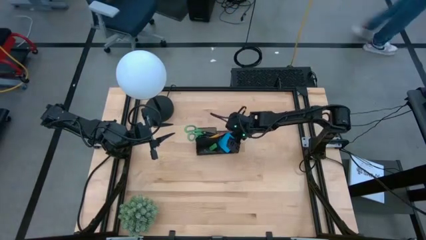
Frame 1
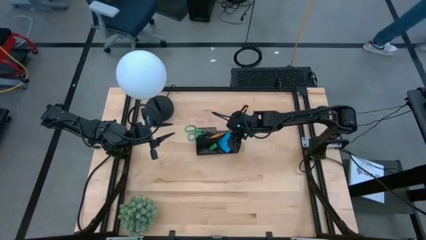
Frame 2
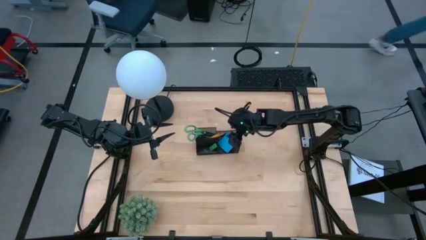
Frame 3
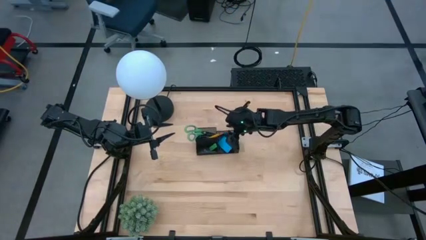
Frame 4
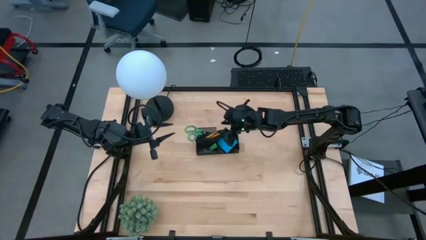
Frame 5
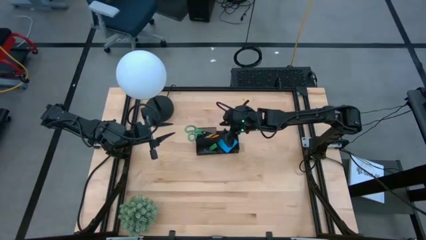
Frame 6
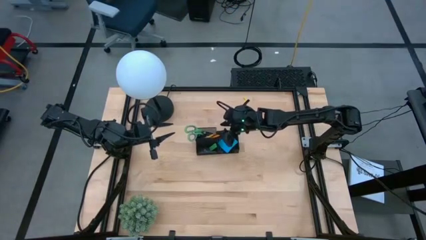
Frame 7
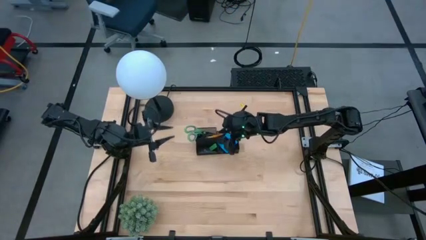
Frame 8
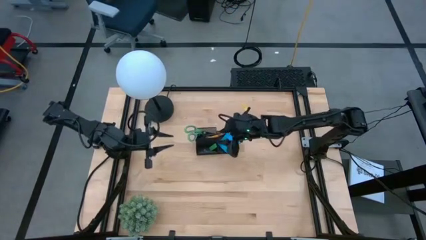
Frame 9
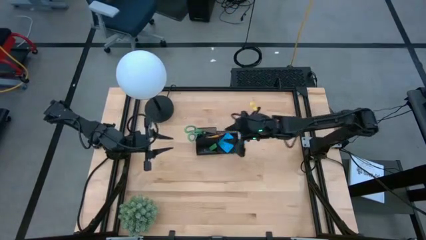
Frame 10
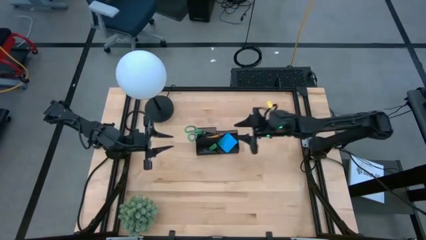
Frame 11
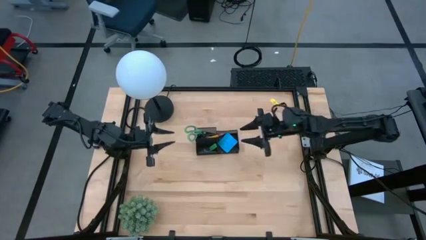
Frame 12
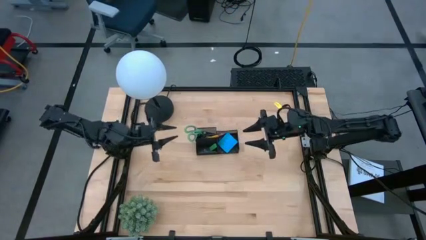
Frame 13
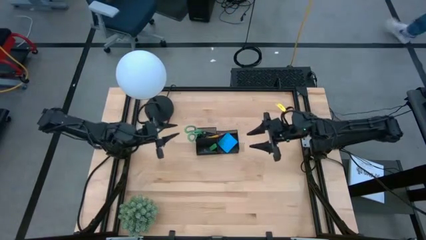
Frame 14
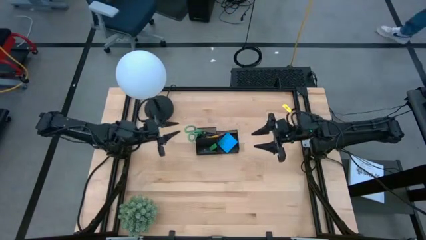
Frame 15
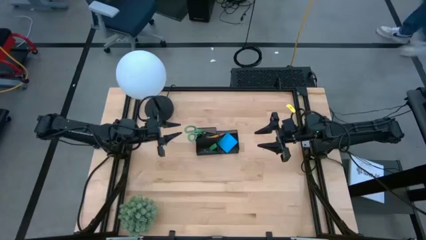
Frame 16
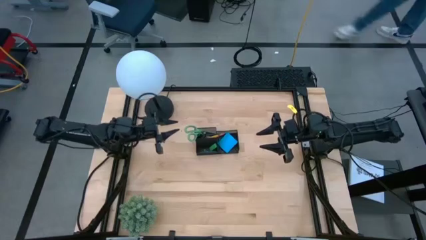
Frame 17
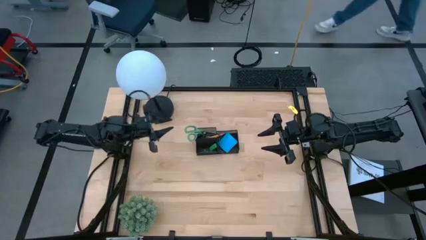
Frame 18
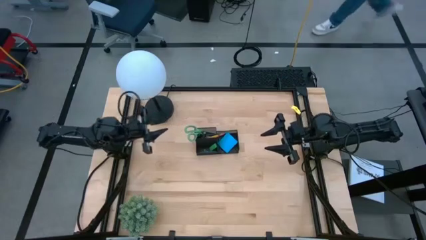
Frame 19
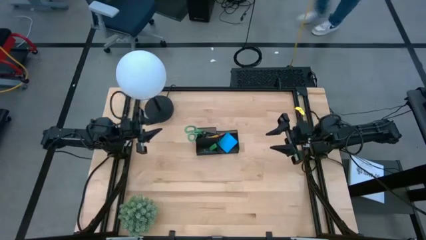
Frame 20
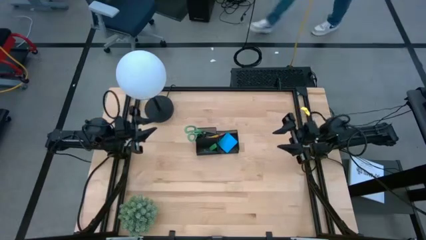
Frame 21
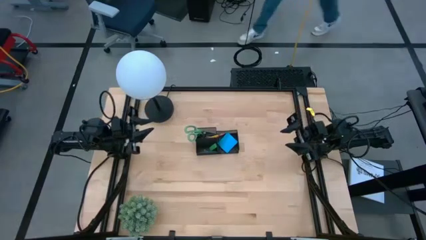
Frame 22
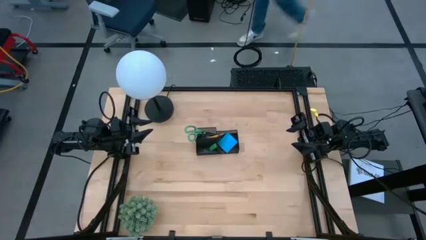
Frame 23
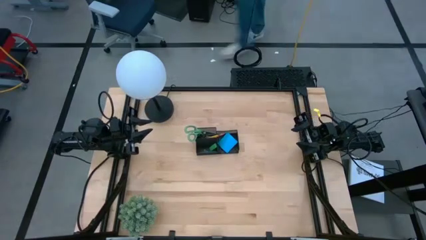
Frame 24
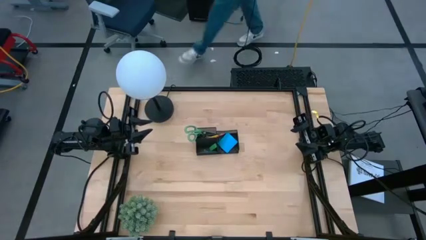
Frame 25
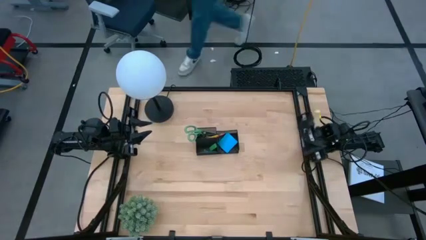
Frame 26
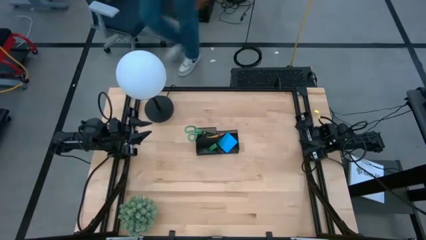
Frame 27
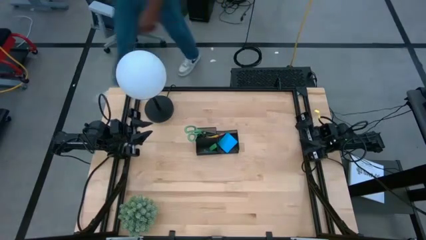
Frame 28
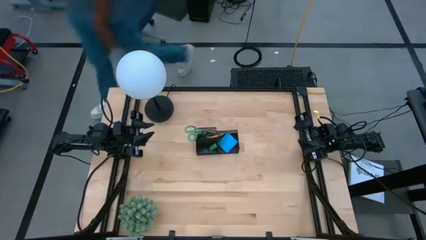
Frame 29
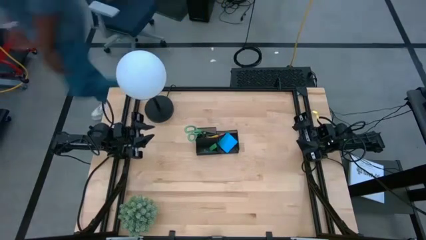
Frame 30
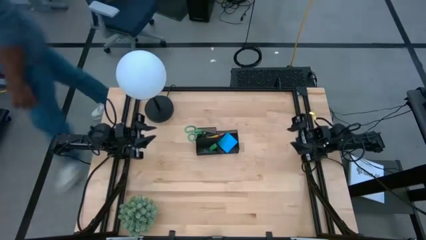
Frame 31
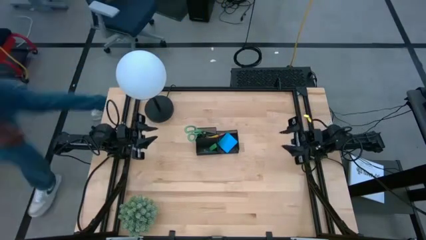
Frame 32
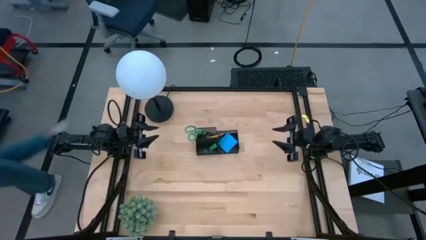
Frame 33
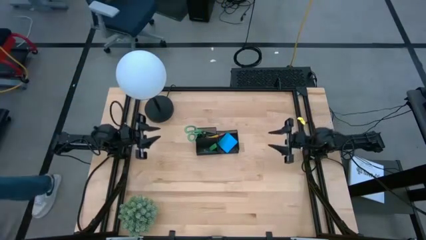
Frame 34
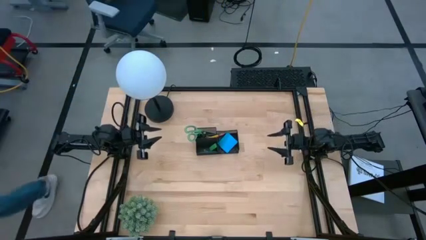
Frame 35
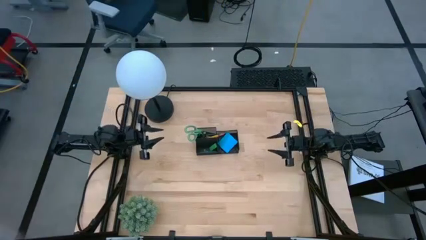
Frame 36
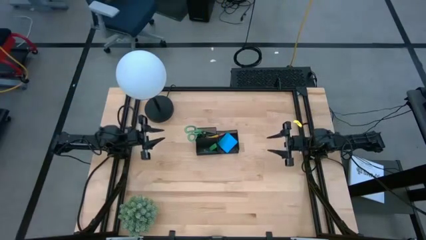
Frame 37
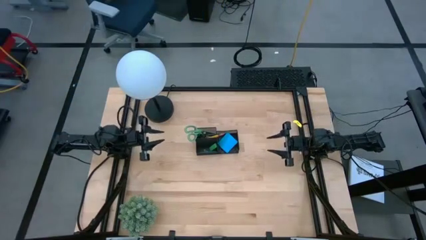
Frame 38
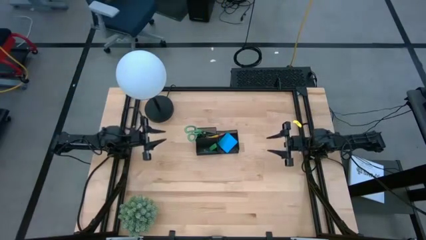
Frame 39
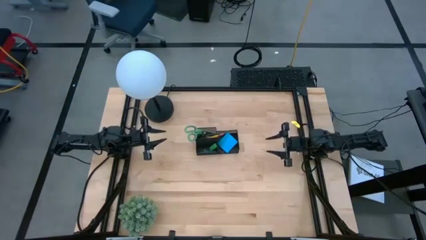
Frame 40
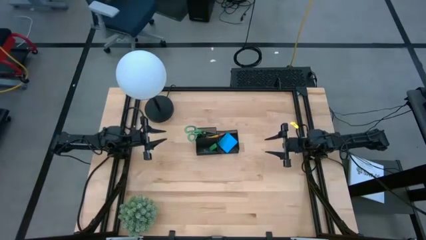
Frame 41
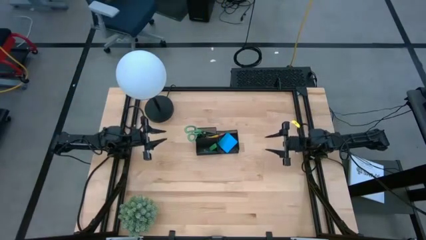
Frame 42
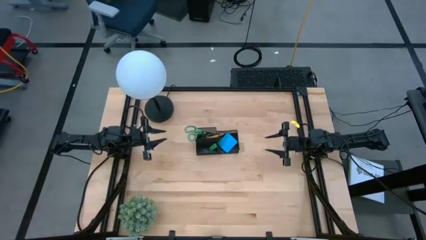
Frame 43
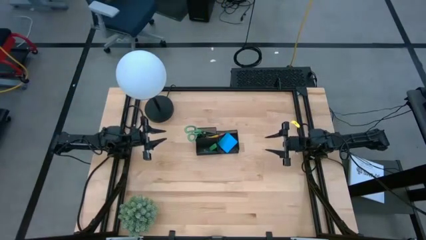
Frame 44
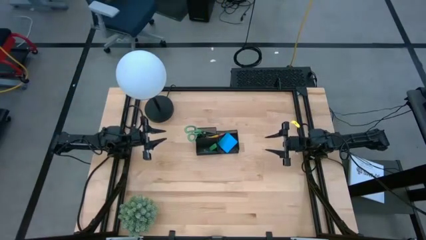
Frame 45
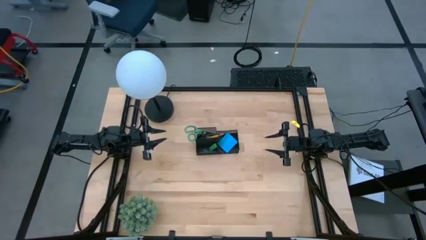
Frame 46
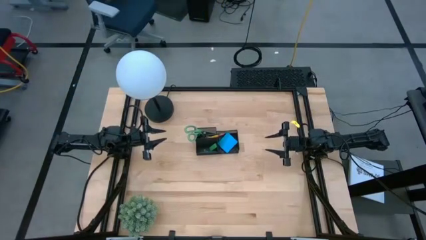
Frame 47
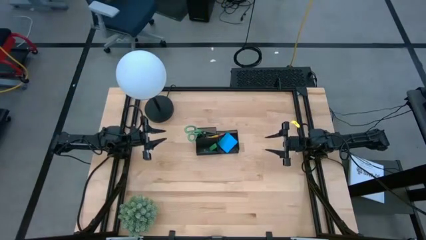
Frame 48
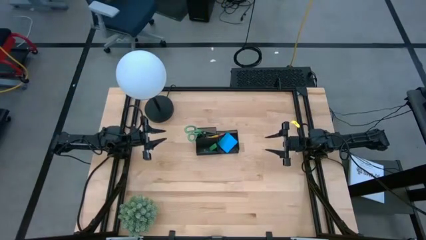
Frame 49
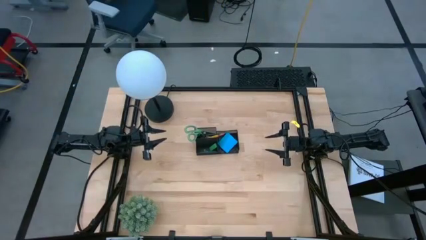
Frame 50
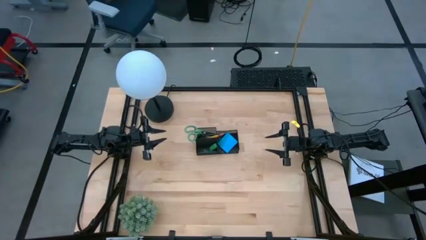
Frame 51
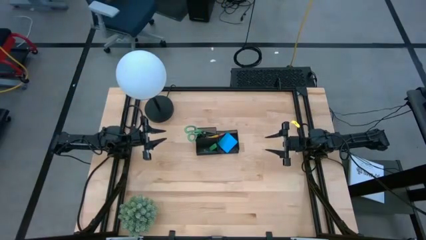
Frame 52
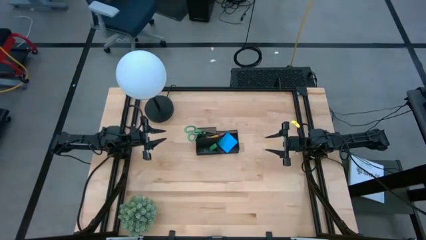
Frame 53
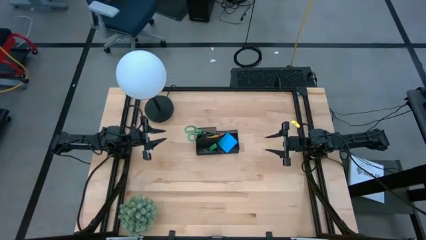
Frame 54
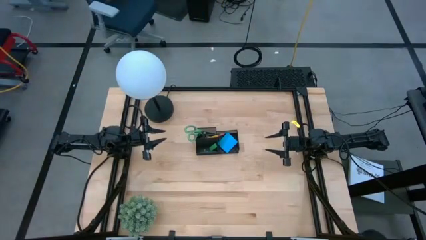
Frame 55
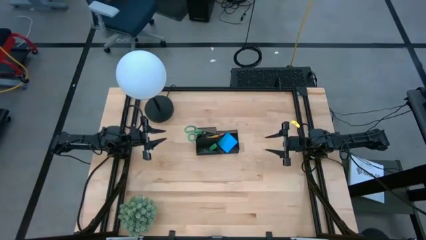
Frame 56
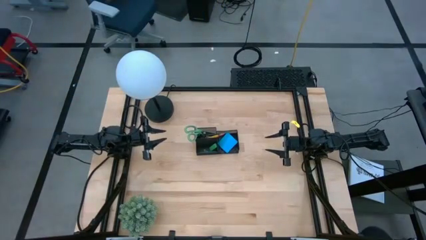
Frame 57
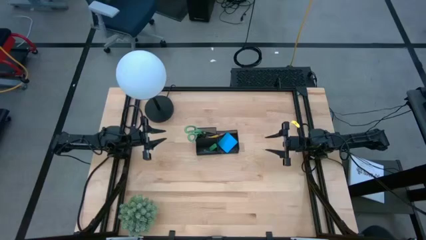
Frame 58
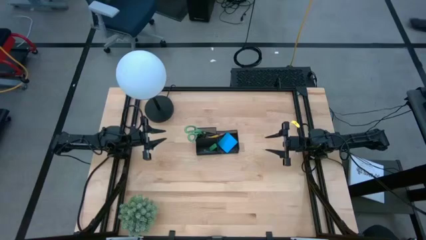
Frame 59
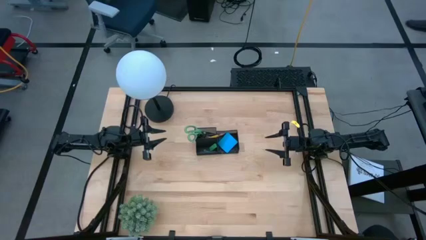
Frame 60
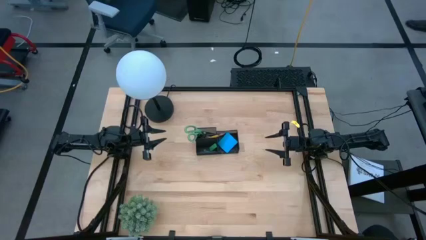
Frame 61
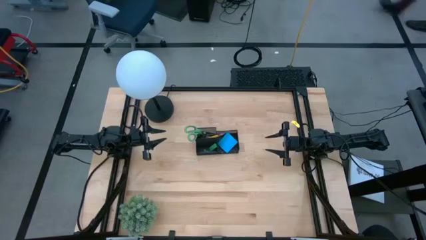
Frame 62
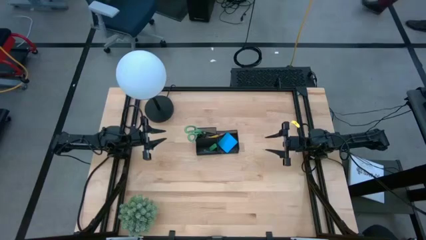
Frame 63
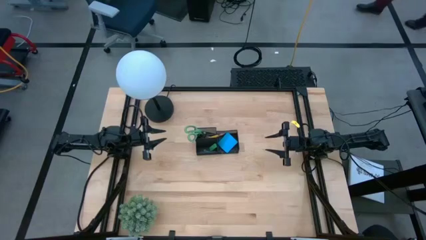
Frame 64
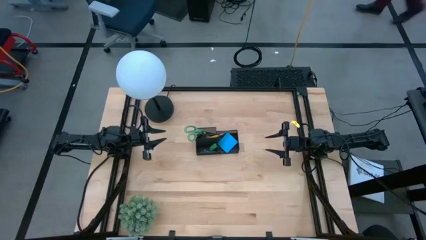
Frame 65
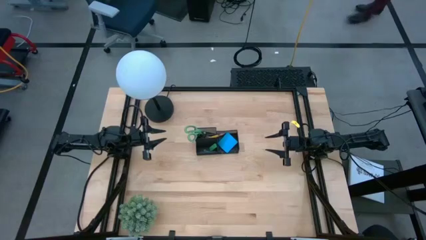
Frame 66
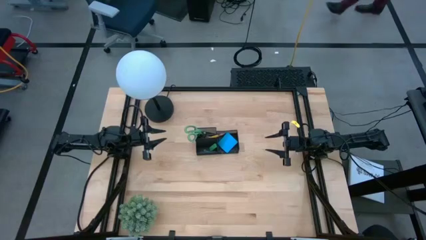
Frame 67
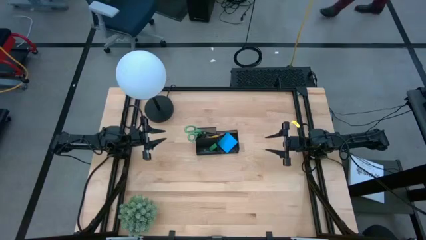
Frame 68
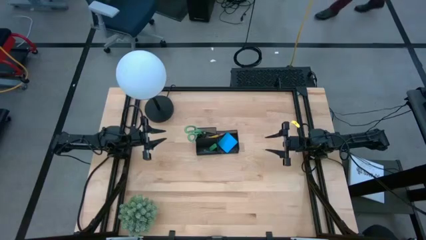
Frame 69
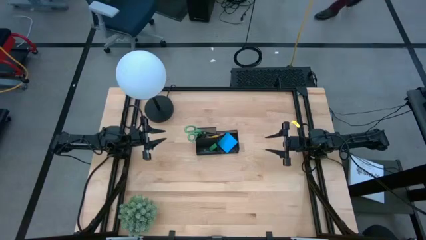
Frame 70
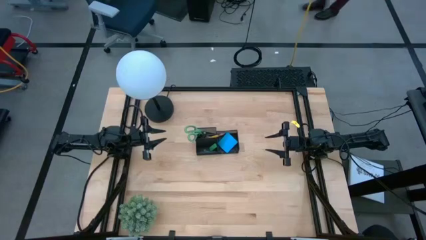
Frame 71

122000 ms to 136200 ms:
Task: Pick and place office supplies into organizer
Return to Home Position
